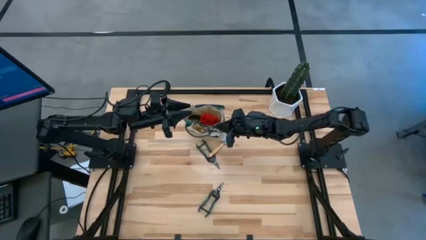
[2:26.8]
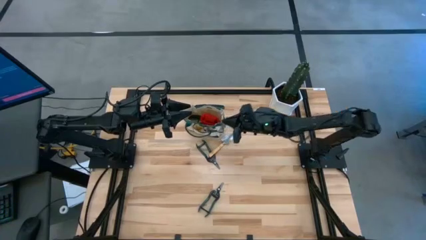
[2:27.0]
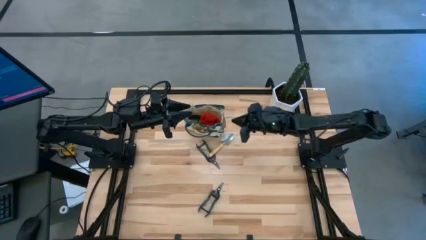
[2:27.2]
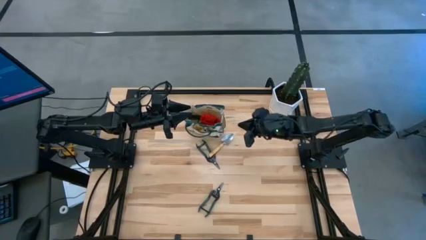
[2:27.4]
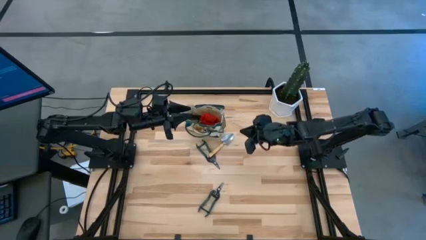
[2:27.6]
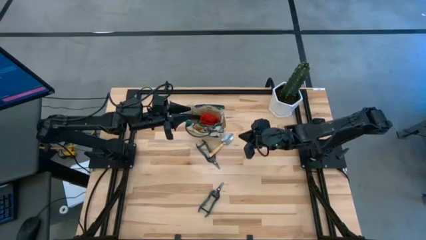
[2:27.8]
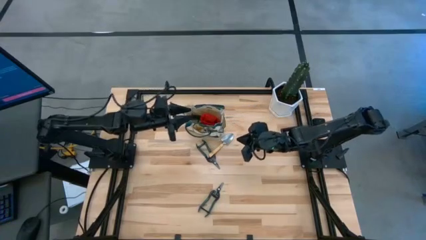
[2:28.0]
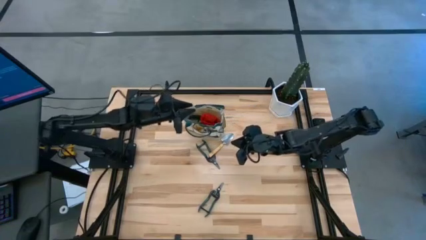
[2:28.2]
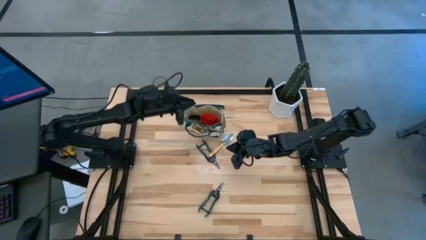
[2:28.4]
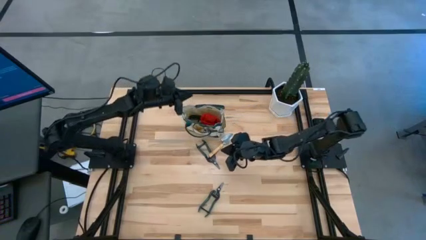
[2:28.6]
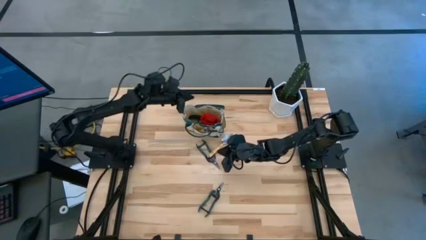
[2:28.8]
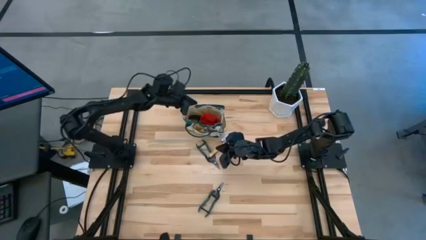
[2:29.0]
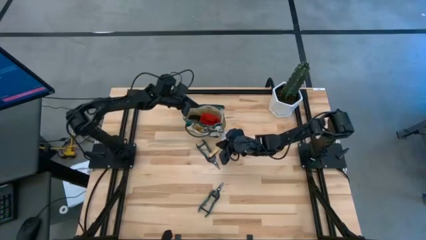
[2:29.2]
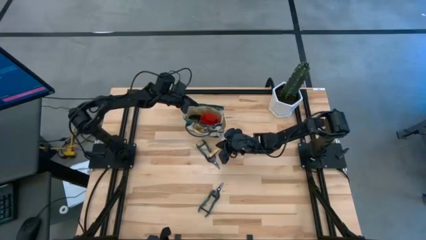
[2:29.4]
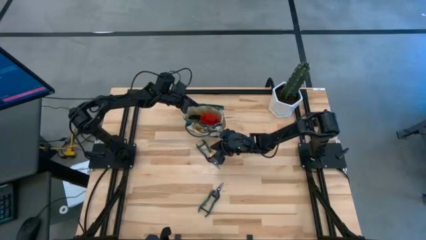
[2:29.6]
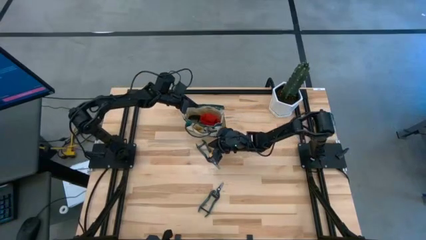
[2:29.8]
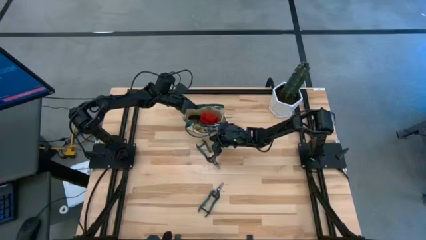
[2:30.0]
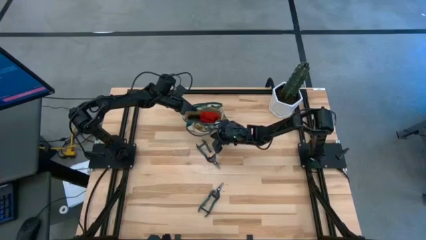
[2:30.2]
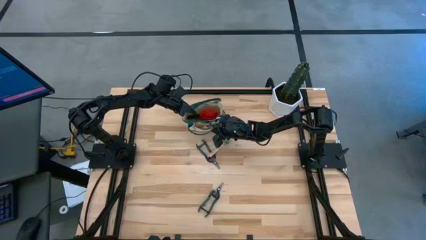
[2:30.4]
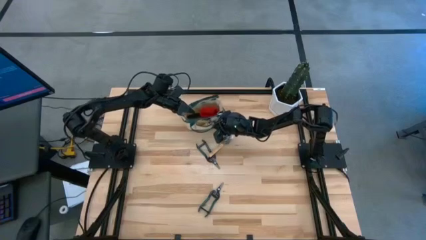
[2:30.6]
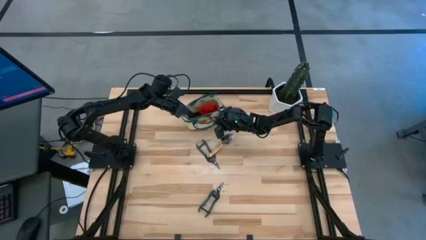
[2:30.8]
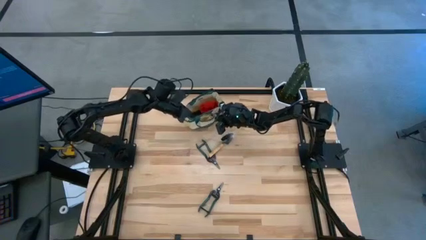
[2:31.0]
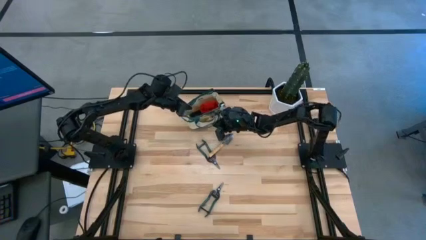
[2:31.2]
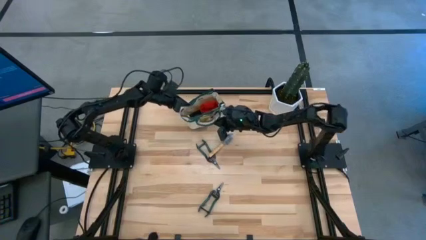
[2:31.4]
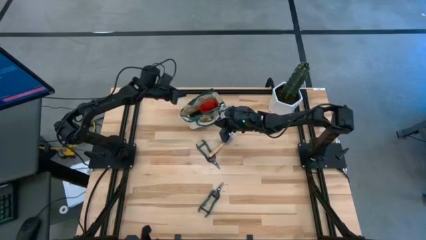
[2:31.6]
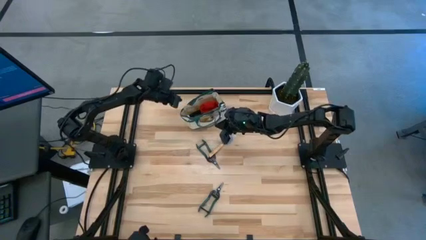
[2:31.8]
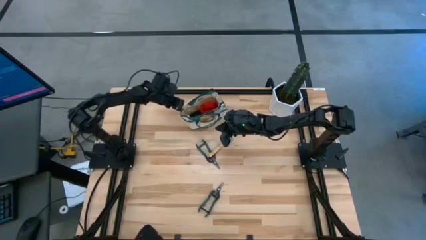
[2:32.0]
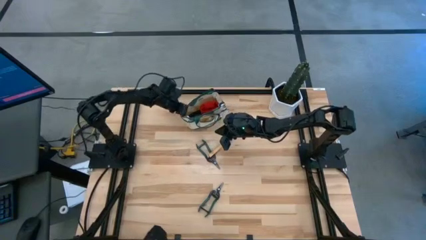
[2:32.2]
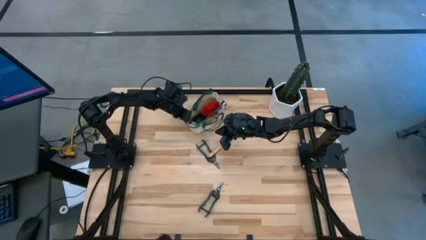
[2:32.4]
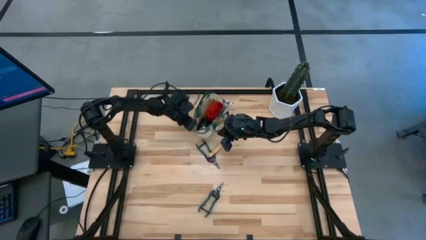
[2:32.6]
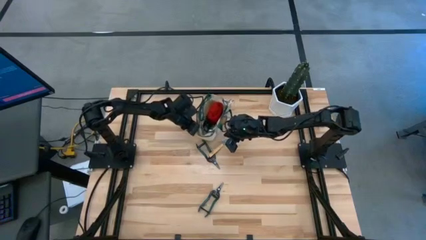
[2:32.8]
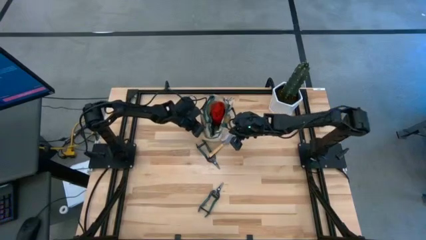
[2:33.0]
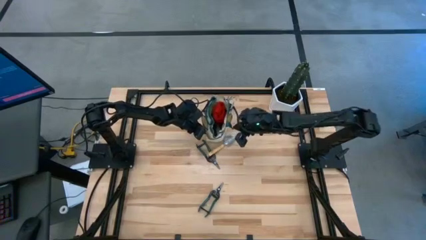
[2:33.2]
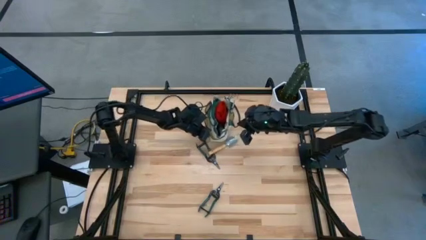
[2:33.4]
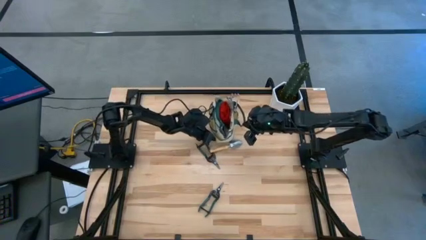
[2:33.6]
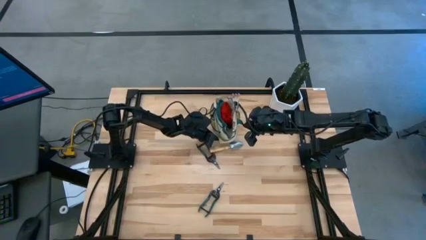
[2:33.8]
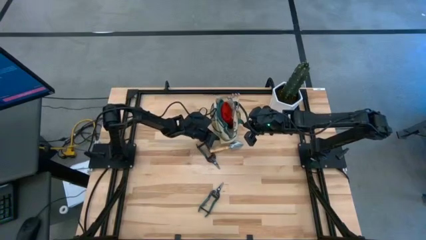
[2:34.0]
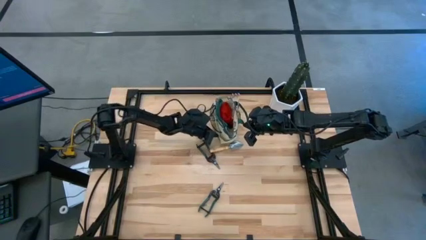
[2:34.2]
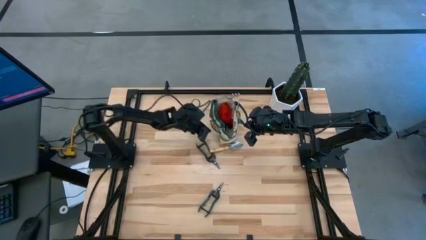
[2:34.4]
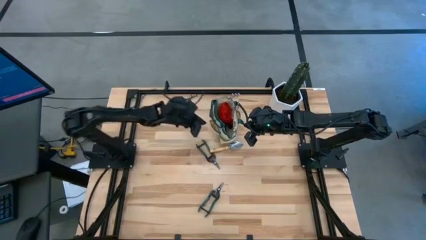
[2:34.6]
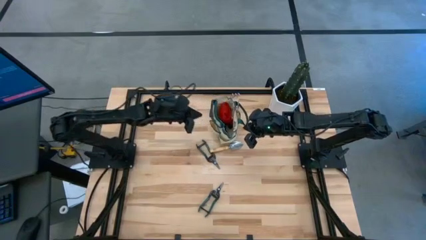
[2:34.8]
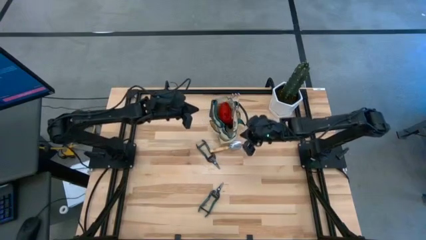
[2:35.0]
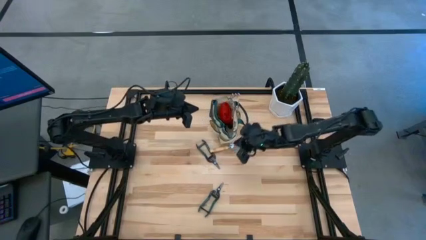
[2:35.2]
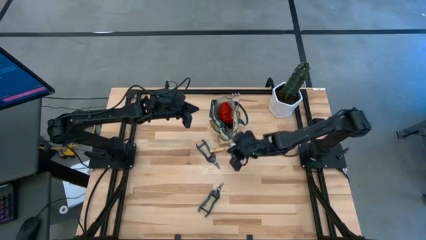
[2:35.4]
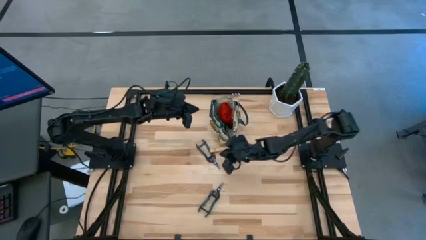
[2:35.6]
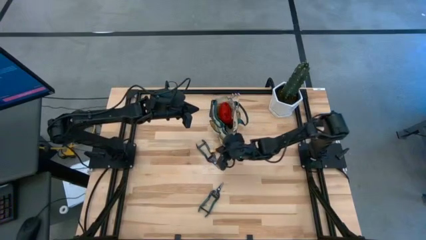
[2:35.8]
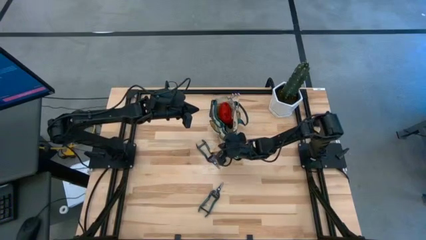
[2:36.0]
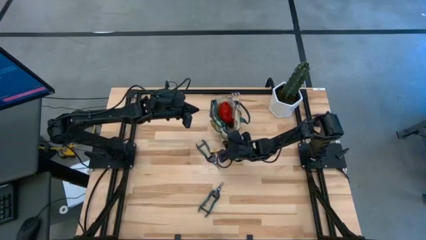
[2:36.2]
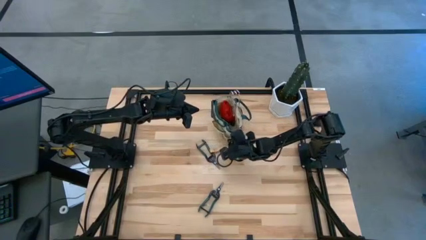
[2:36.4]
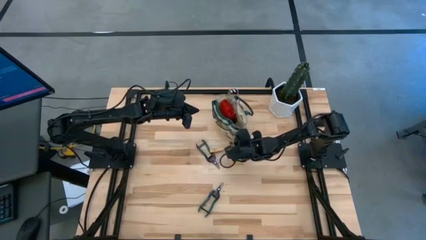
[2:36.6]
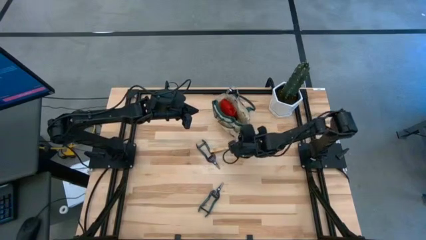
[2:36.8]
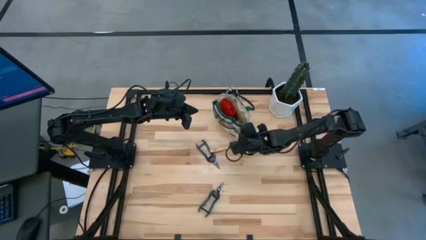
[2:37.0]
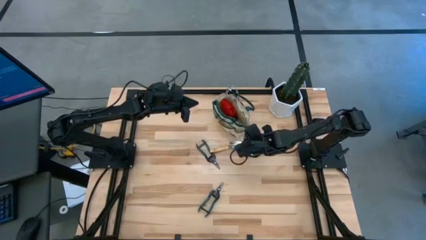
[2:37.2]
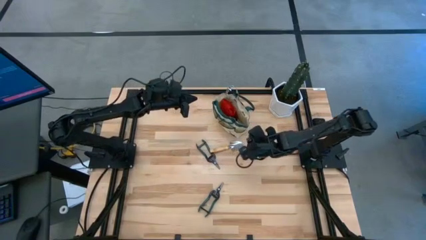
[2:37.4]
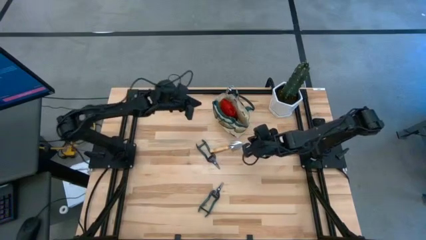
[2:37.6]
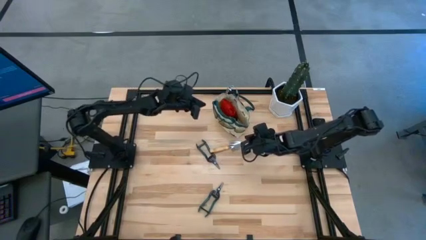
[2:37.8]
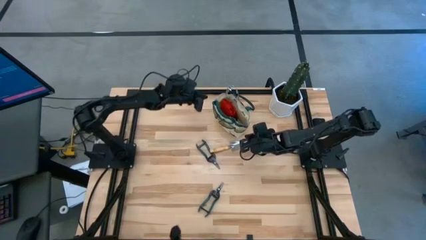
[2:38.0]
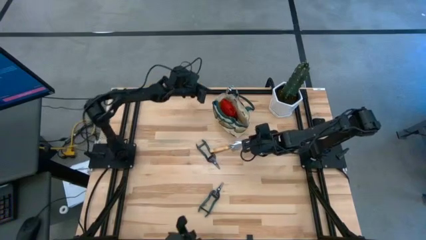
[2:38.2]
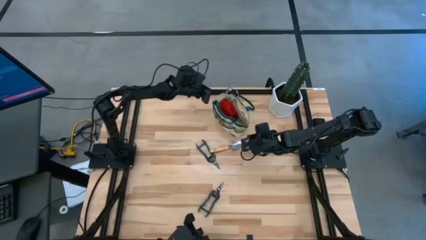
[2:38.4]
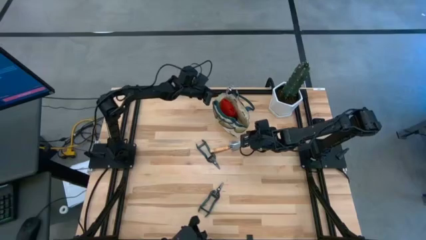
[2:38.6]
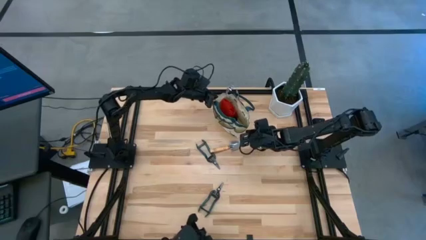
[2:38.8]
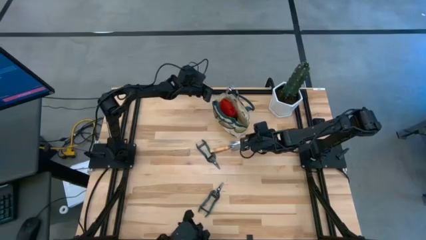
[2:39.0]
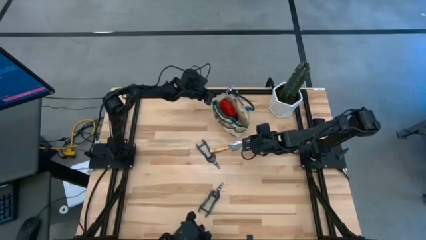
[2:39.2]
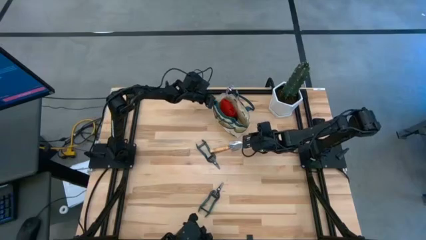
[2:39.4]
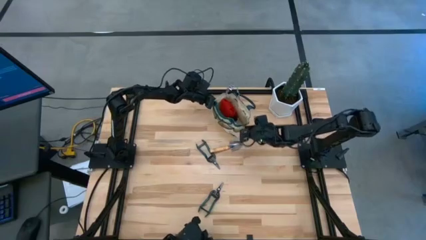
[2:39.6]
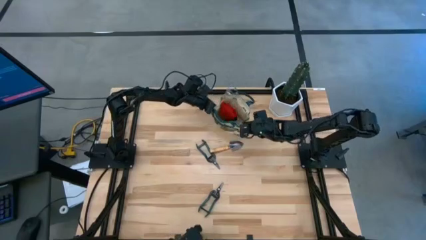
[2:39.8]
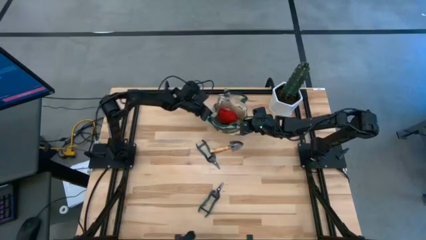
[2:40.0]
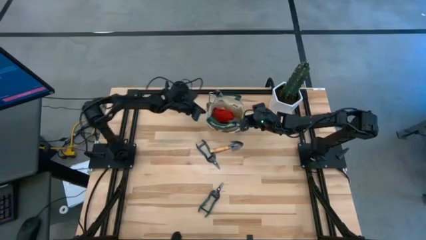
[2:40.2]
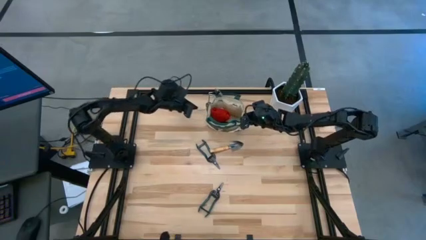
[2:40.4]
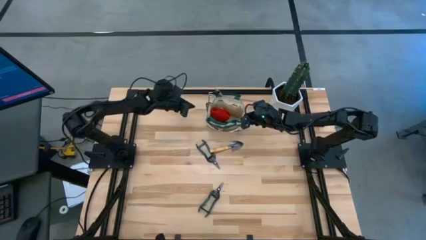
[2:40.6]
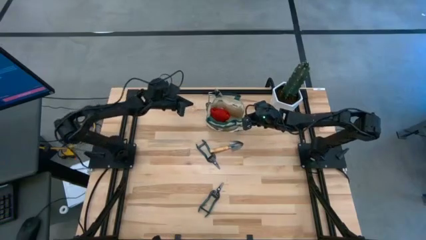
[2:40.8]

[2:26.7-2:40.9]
Task: Pick & Place Garden tools in Gardening bag
Adjust the brown gardening bag
